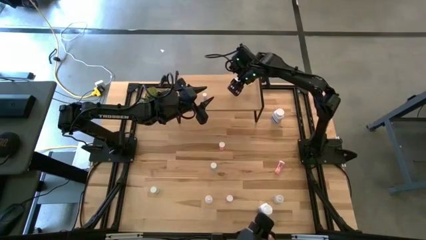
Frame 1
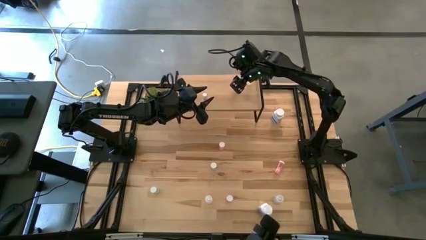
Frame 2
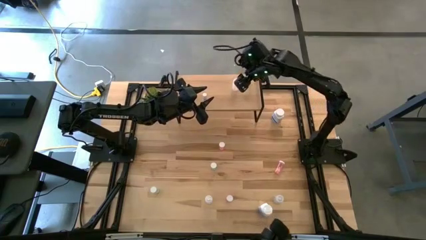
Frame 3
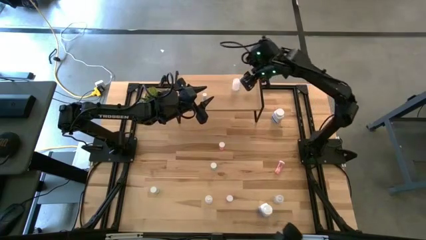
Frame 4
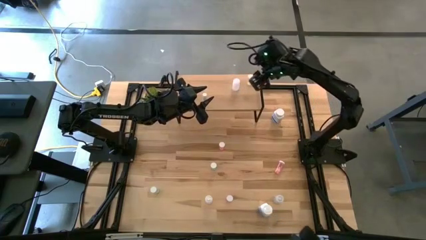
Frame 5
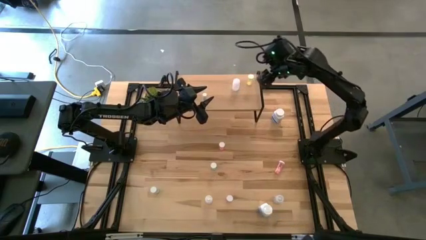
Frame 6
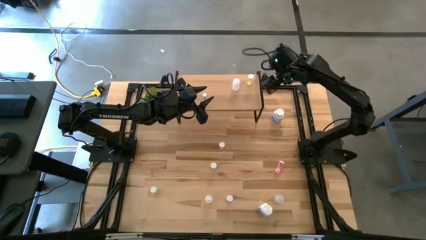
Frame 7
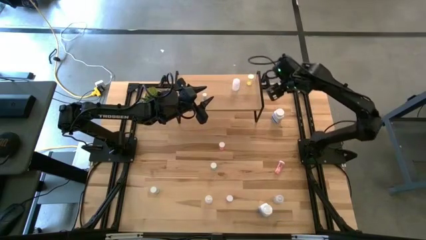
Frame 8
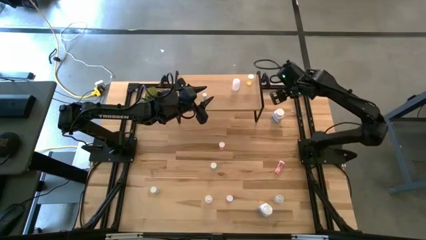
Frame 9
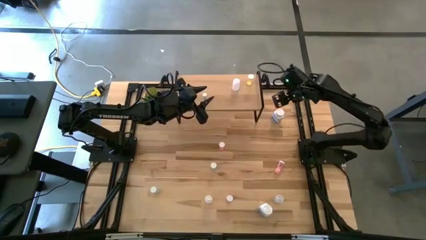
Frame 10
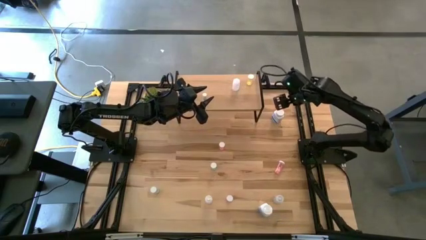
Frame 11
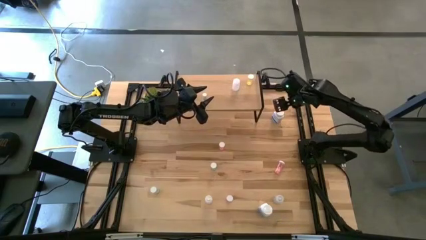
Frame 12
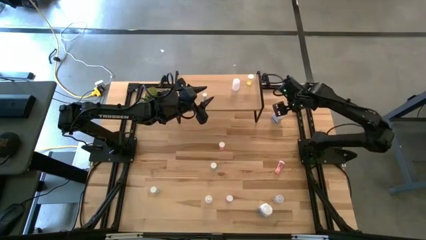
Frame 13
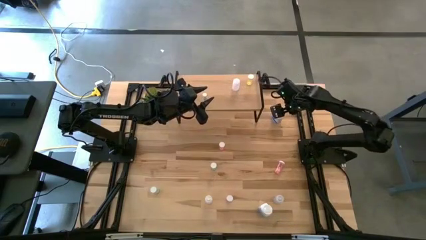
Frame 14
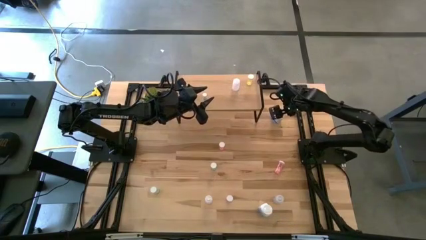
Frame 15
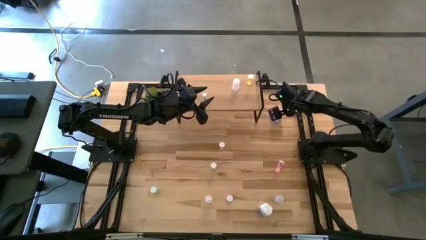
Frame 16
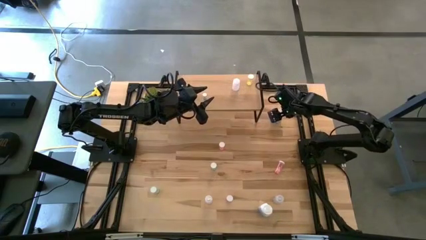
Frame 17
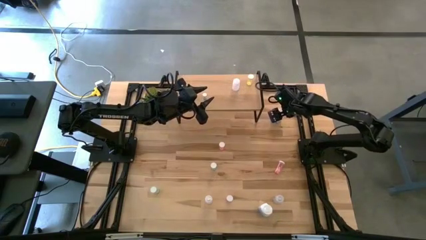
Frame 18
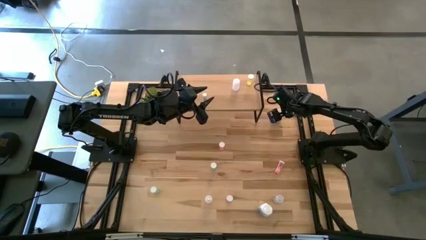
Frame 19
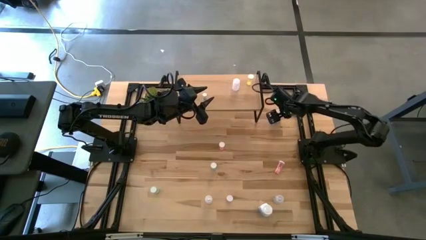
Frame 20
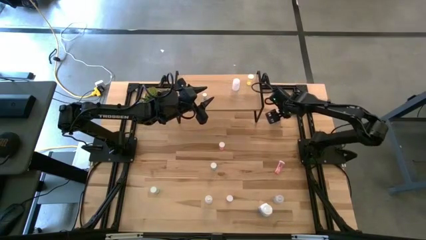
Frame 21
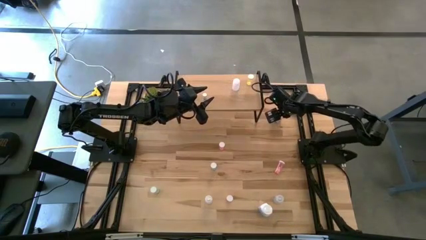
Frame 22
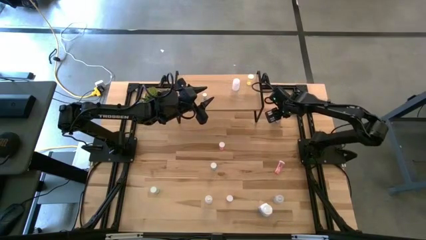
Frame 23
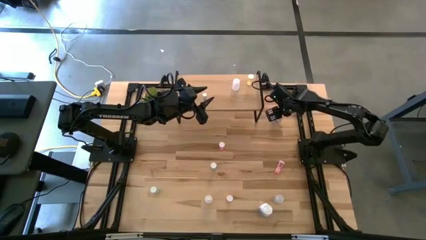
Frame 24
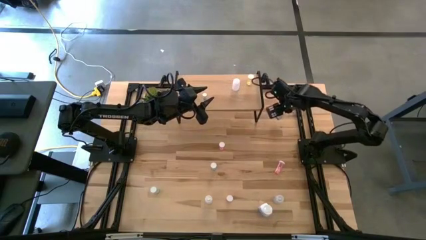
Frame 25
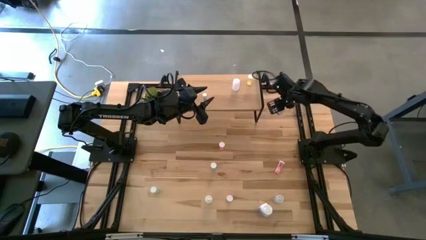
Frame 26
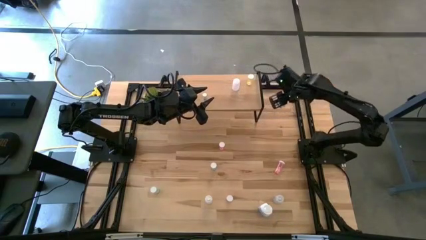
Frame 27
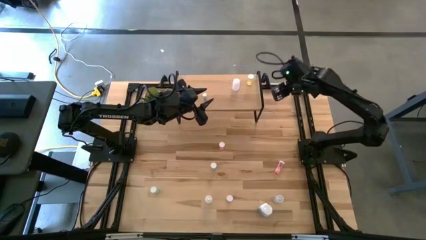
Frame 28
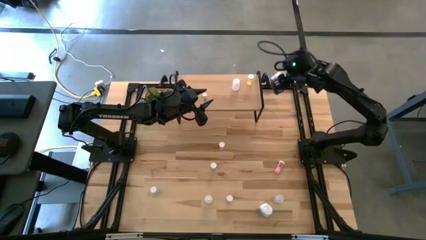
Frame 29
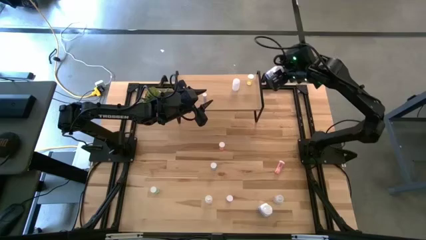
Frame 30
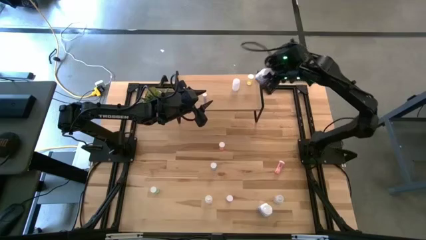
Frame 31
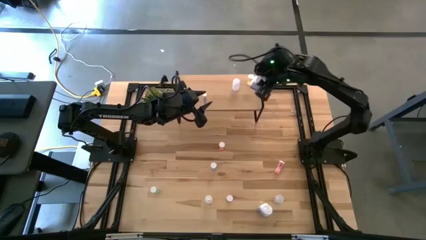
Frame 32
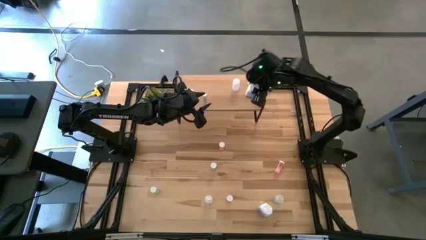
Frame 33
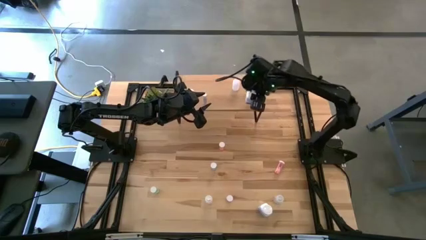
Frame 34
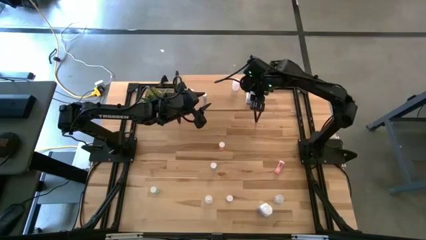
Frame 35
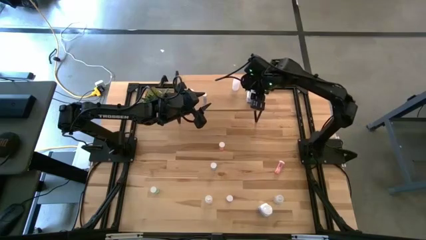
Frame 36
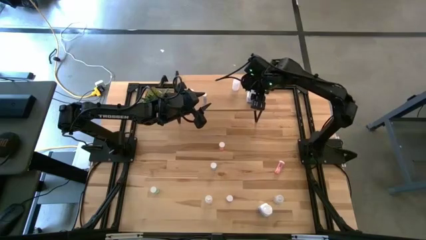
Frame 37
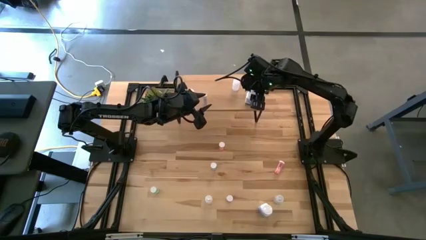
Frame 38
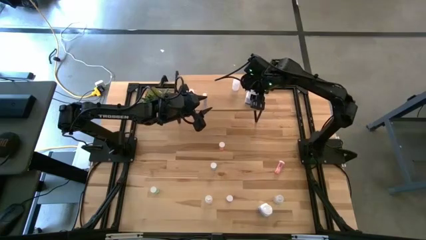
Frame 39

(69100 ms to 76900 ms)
Task: Pick and place medicine bottles onto shelf by color
Put the top white blue pill bottle on the shelf

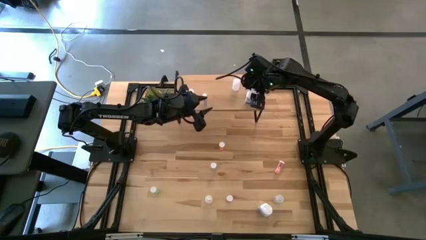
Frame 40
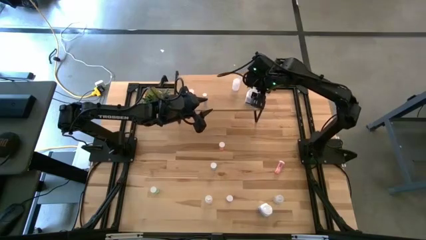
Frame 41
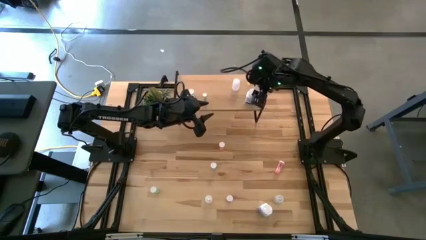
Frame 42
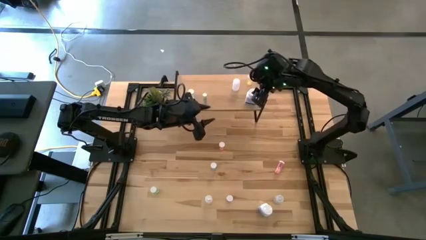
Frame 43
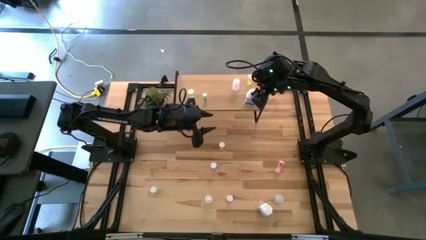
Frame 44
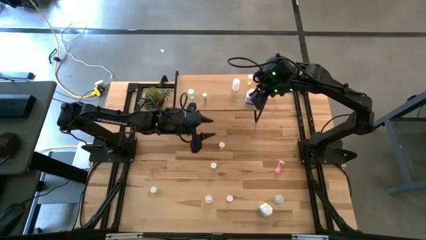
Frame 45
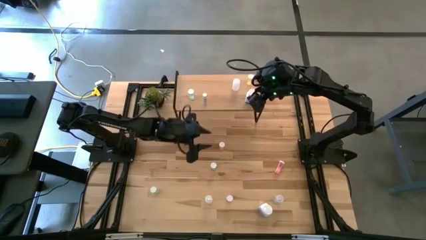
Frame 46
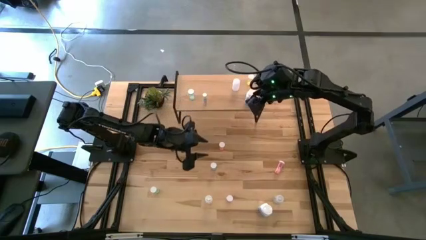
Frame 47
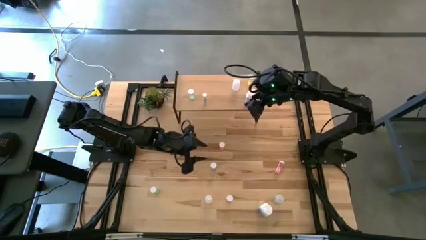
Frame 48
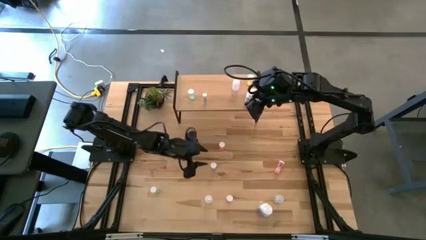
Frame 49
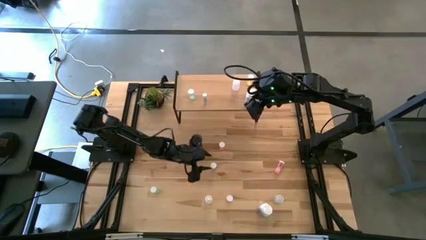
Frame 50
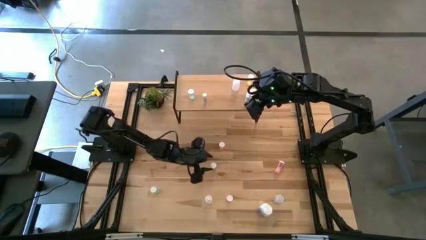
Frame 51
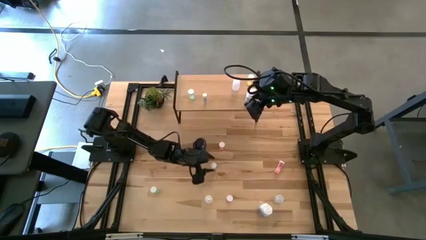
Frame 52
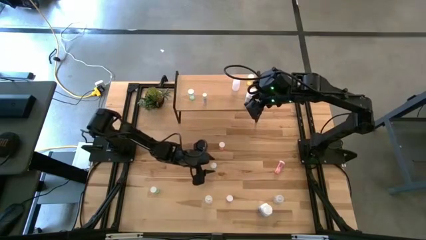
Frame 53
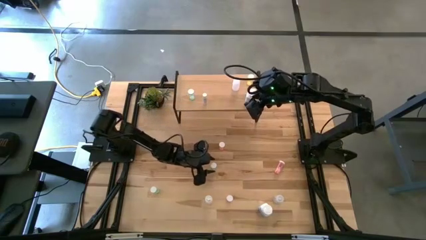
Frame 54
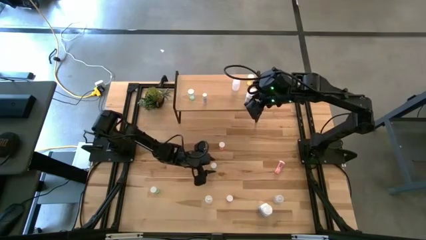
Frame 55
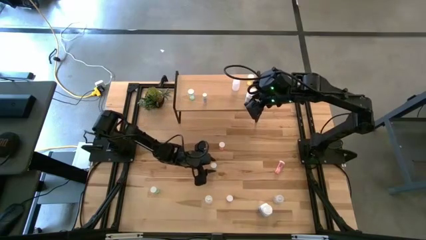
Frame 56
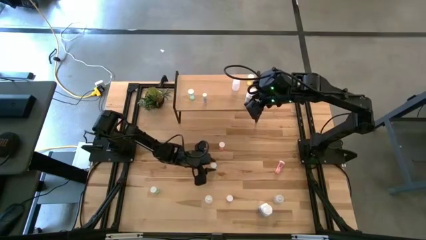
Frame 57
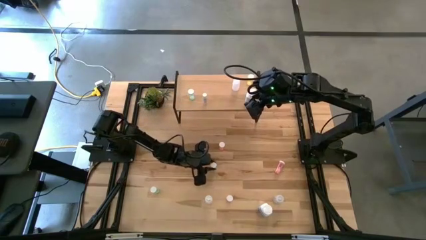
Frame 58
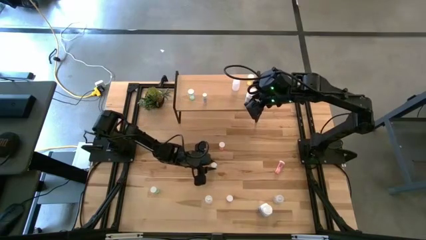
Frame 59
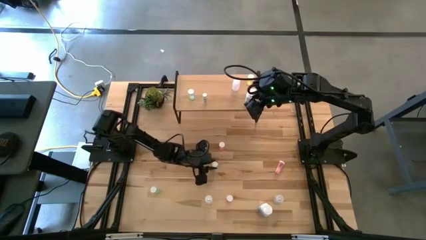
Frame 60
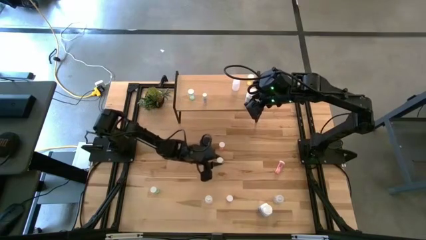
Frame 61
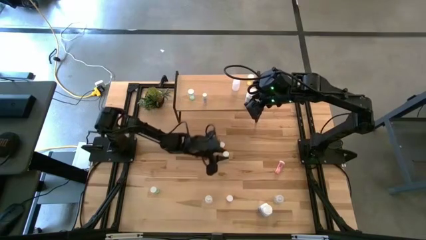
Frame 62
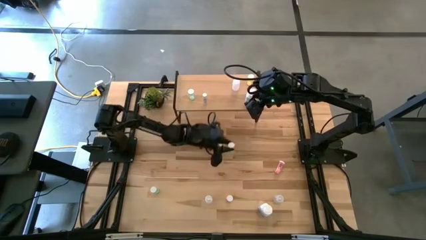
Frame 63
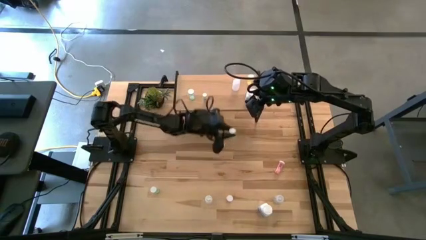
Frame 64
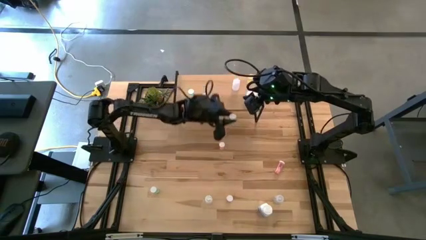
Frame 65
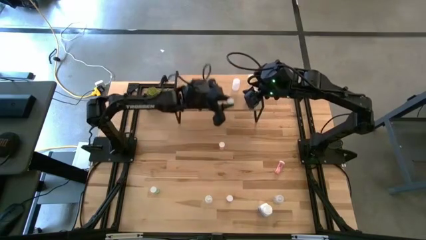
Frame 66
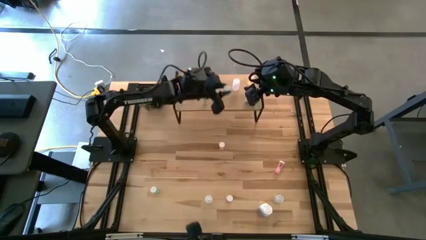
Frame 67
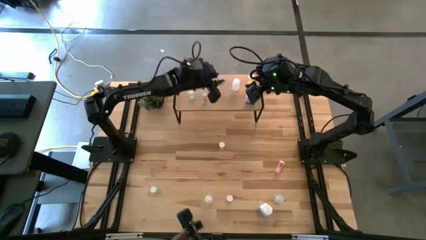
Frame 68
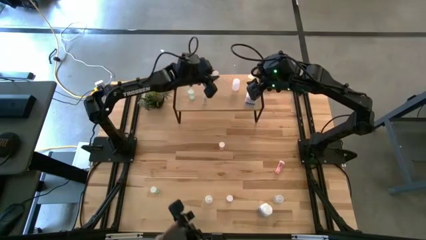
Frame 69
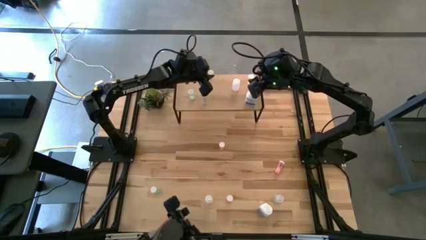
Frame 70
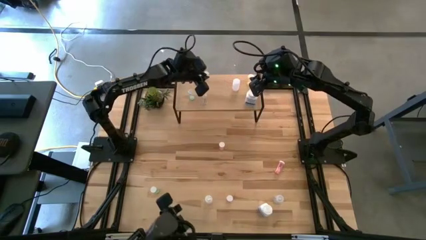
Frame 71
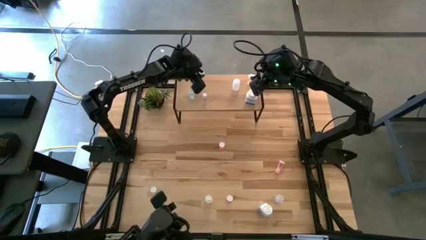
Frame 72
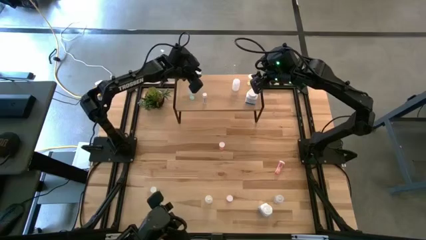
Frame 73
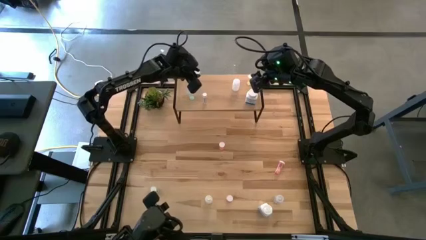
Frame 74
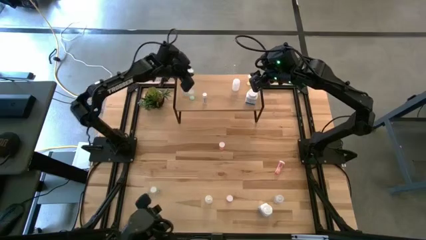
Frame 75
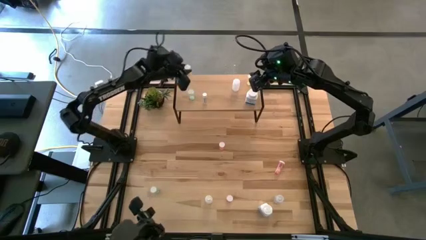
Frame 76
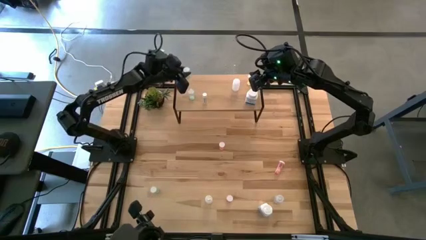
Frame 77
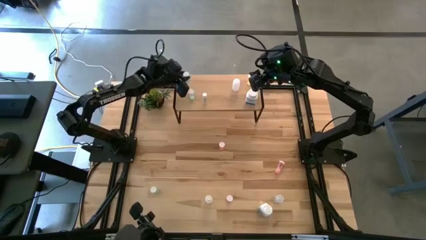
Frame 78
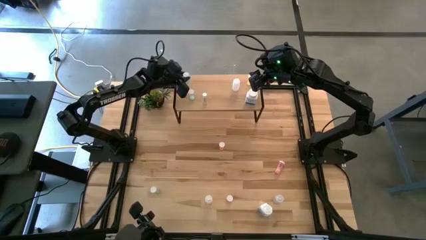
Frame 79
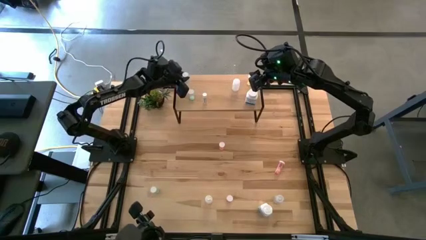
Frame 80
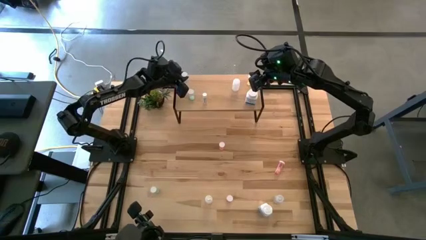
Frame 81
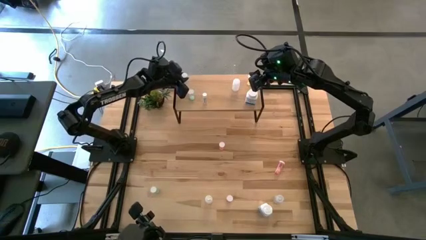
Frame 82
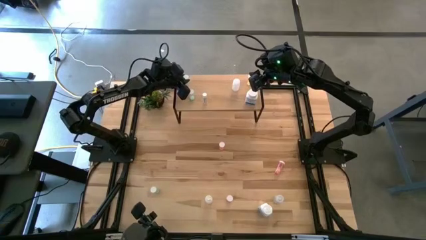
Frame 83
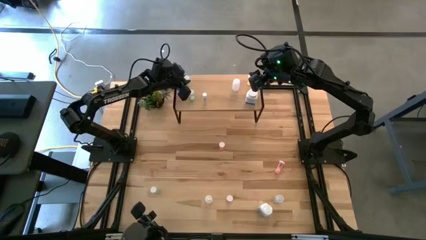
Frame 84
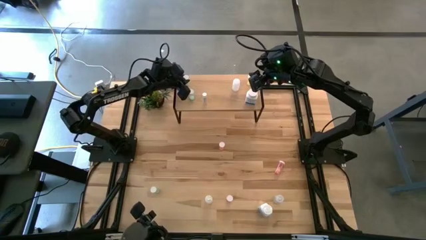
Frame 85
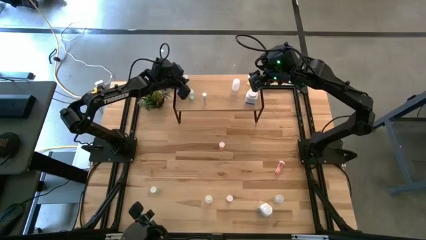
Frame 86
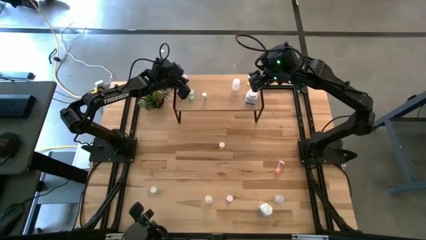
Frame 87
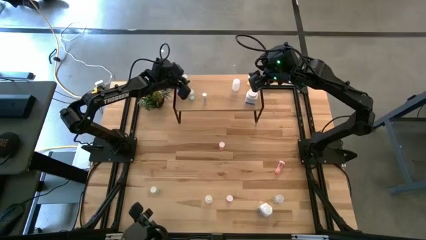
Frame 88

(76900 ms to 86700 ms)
Put the right green pill bottle on the shelf
